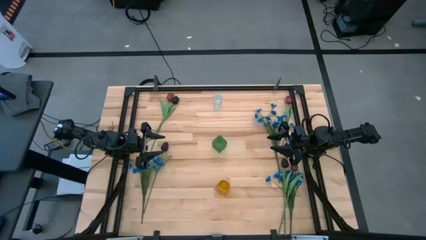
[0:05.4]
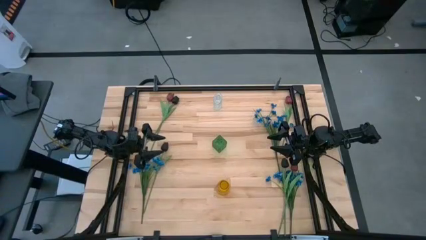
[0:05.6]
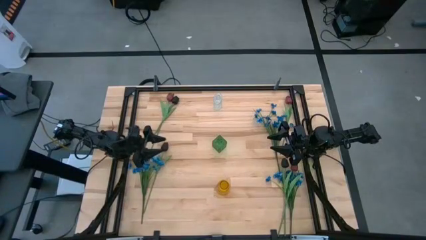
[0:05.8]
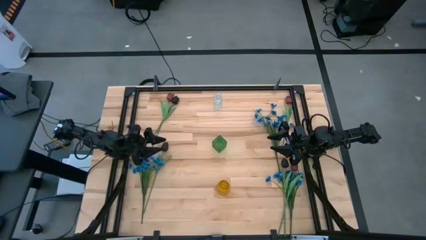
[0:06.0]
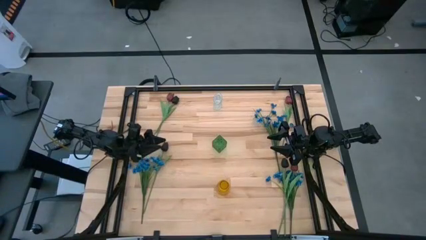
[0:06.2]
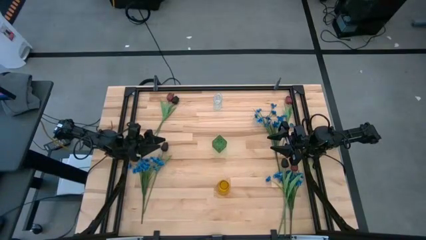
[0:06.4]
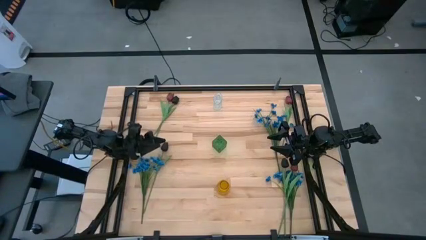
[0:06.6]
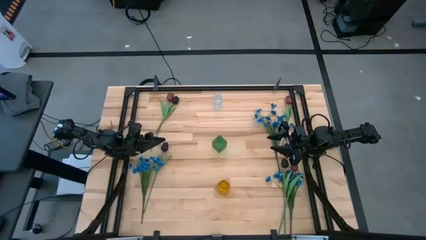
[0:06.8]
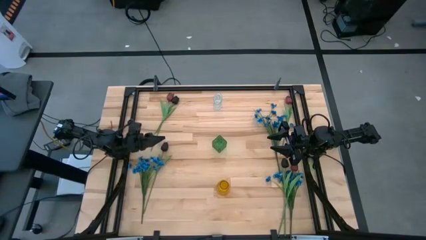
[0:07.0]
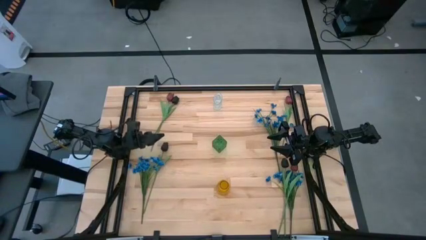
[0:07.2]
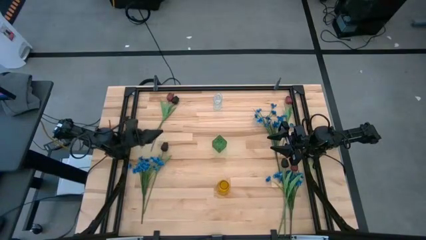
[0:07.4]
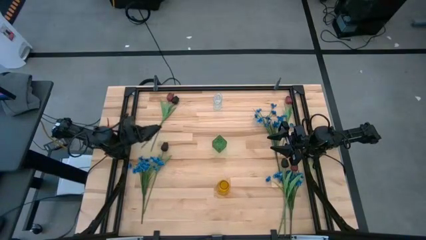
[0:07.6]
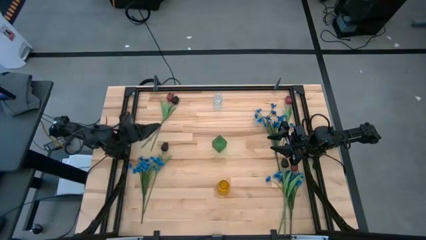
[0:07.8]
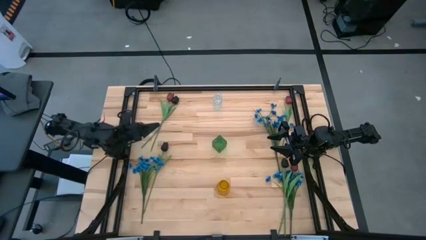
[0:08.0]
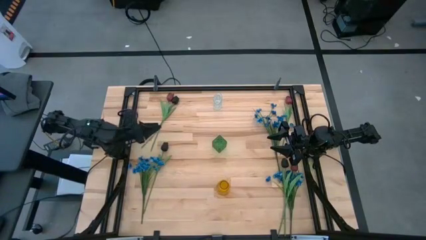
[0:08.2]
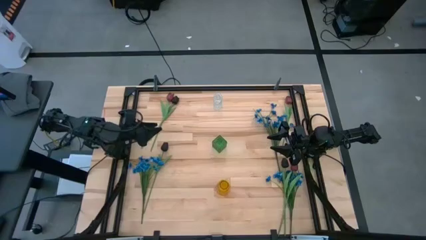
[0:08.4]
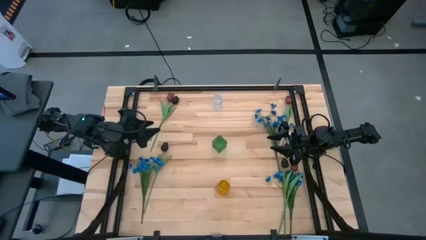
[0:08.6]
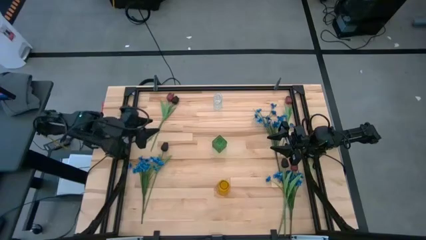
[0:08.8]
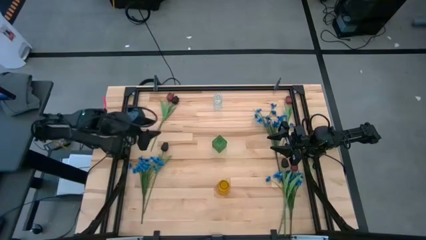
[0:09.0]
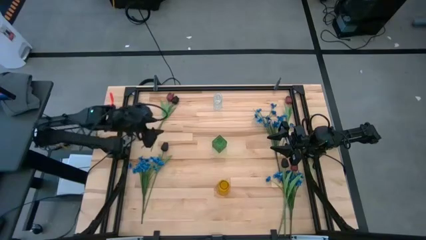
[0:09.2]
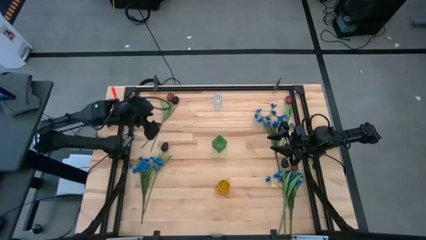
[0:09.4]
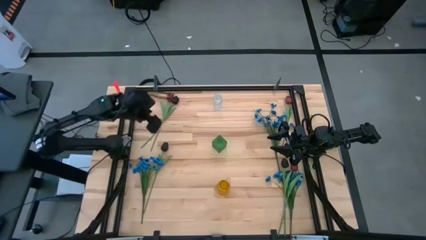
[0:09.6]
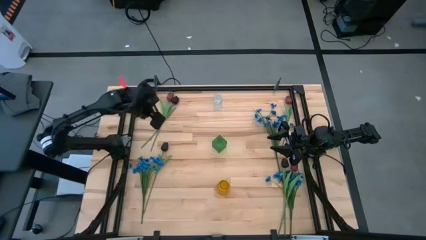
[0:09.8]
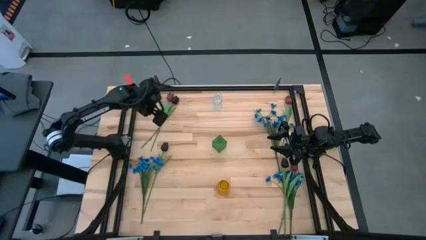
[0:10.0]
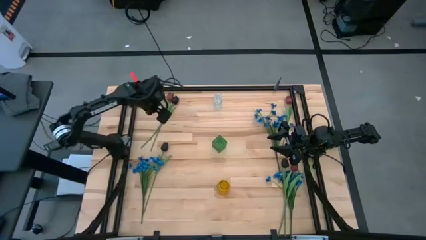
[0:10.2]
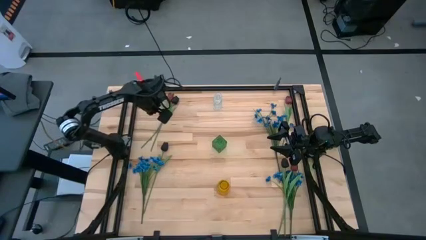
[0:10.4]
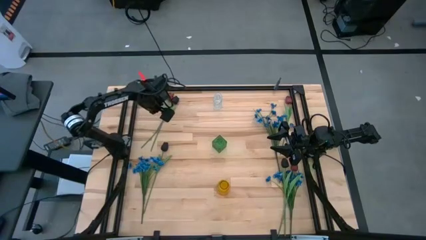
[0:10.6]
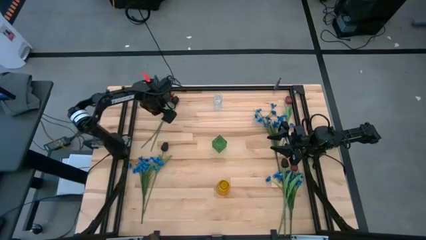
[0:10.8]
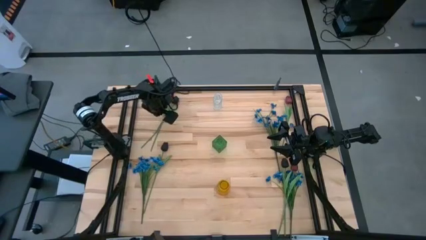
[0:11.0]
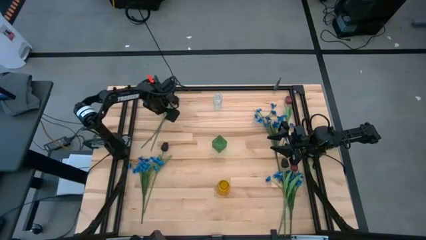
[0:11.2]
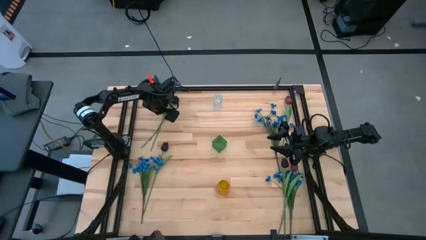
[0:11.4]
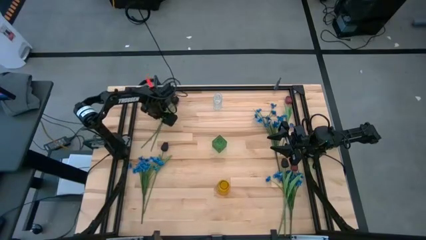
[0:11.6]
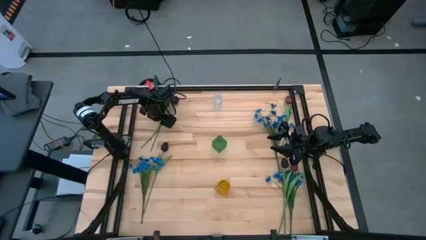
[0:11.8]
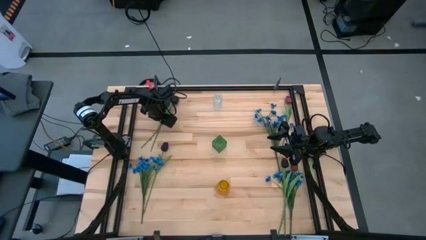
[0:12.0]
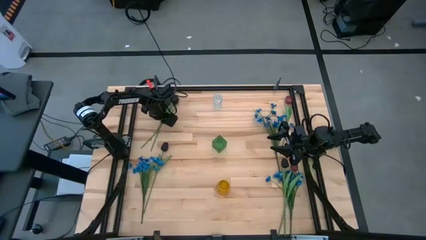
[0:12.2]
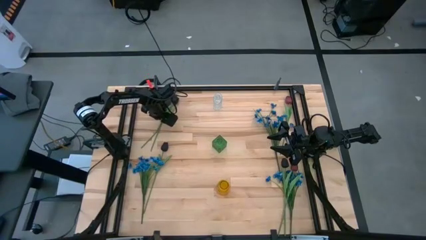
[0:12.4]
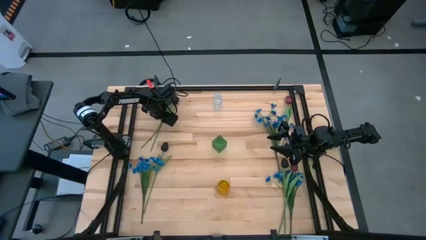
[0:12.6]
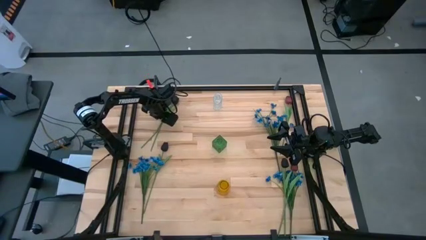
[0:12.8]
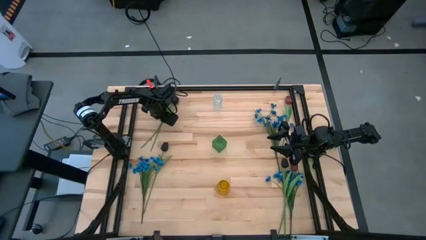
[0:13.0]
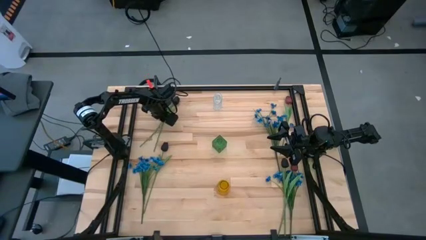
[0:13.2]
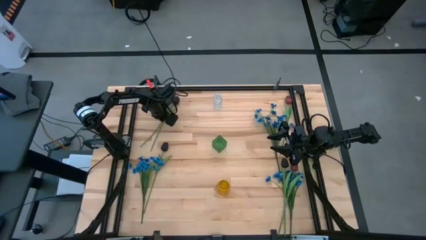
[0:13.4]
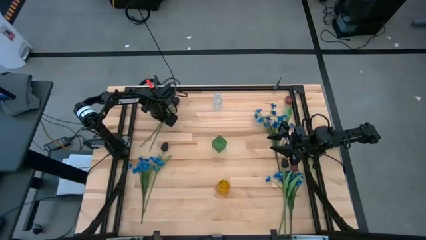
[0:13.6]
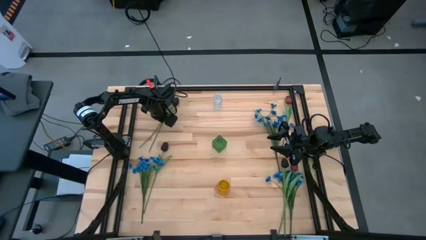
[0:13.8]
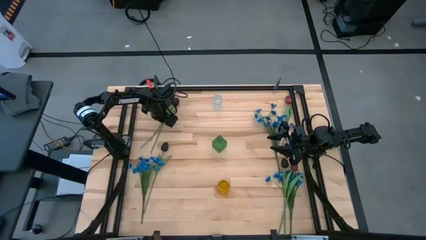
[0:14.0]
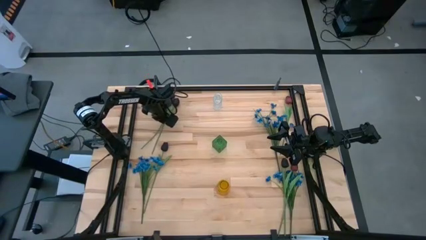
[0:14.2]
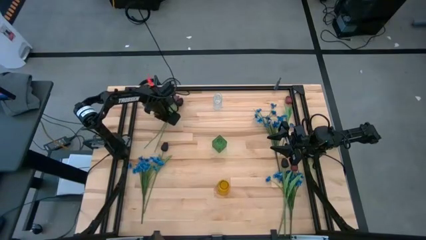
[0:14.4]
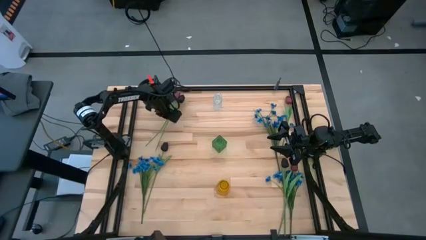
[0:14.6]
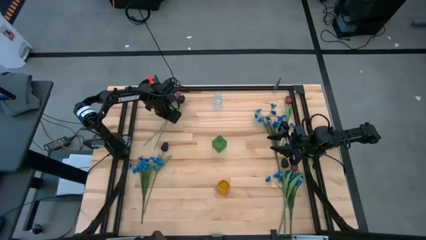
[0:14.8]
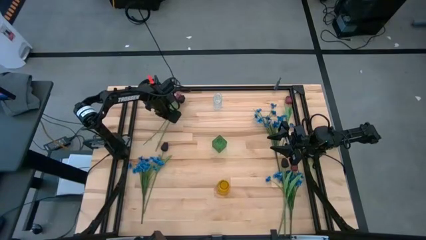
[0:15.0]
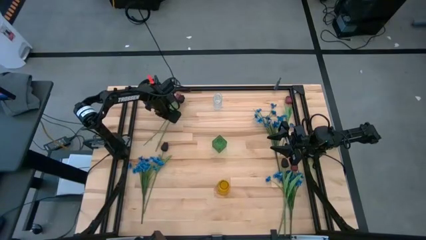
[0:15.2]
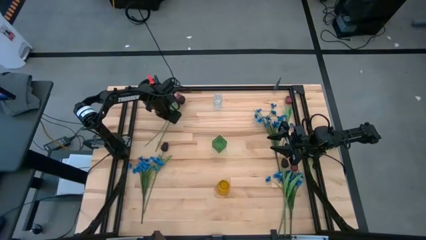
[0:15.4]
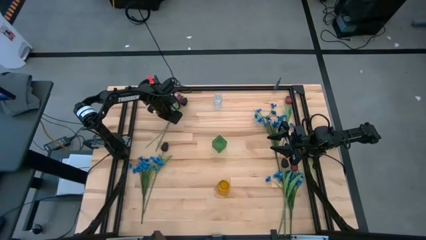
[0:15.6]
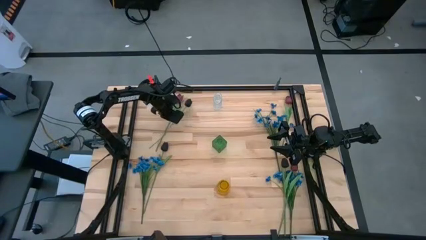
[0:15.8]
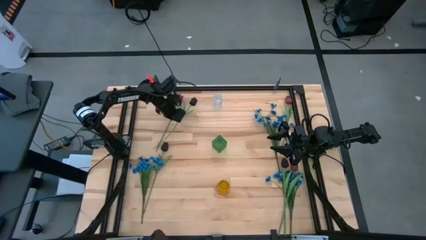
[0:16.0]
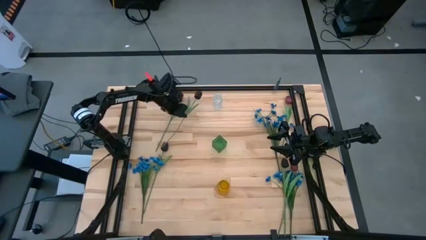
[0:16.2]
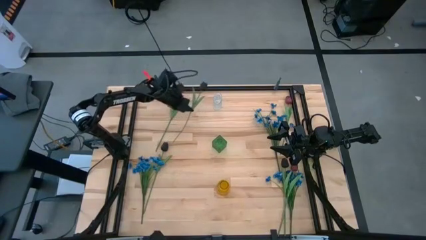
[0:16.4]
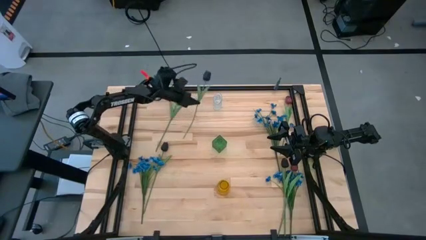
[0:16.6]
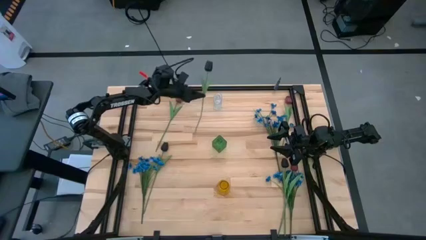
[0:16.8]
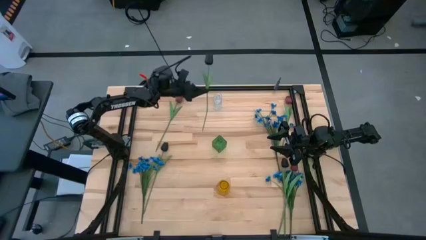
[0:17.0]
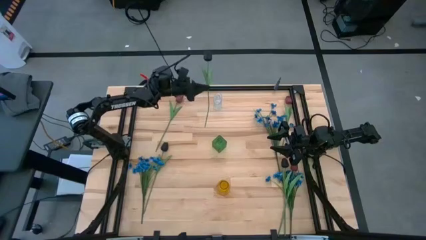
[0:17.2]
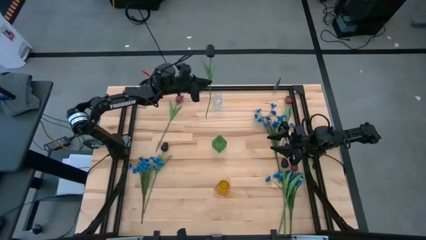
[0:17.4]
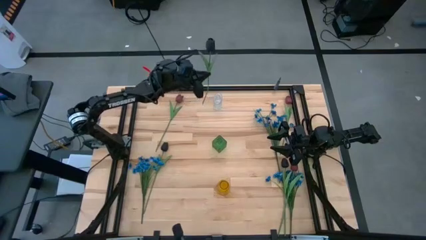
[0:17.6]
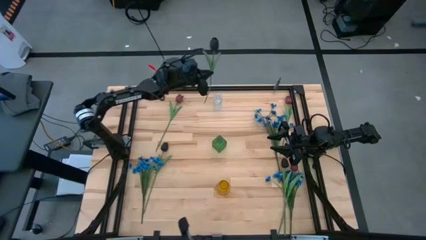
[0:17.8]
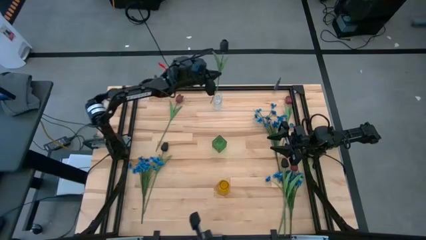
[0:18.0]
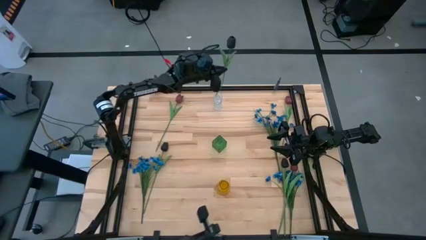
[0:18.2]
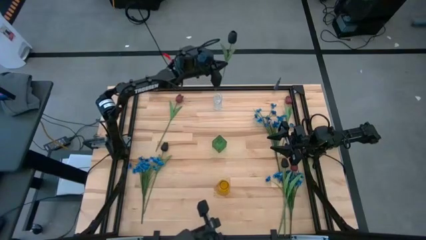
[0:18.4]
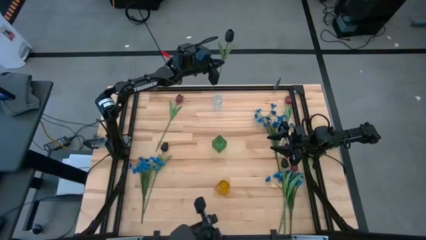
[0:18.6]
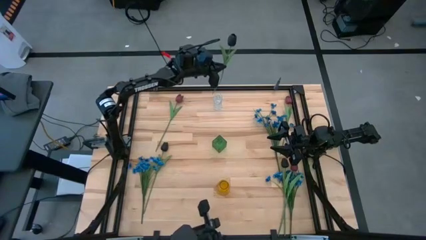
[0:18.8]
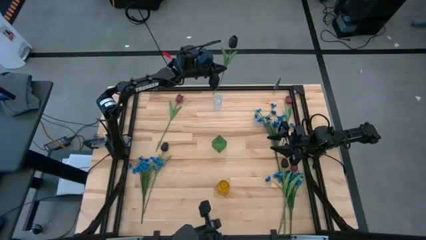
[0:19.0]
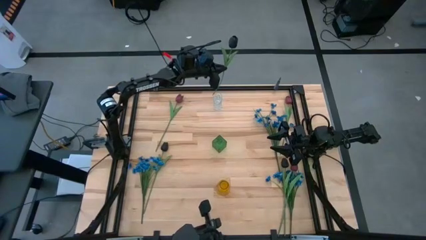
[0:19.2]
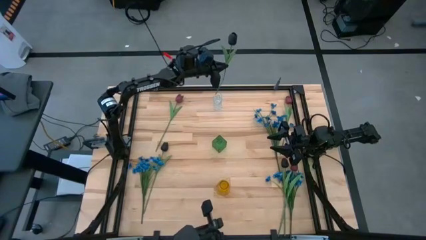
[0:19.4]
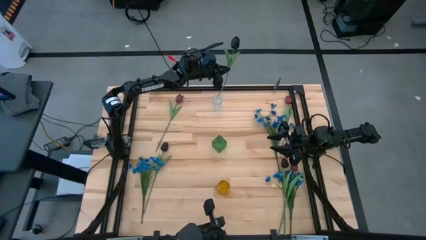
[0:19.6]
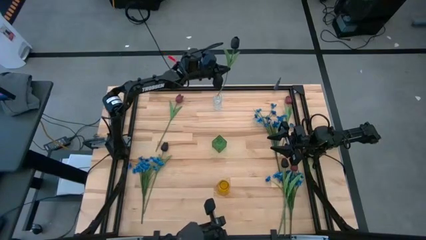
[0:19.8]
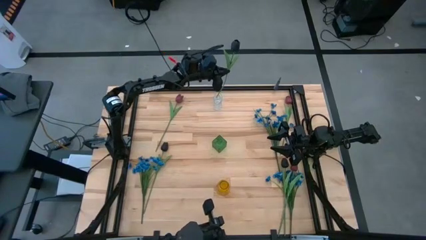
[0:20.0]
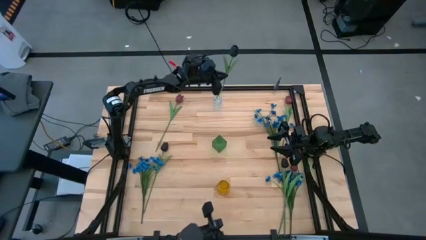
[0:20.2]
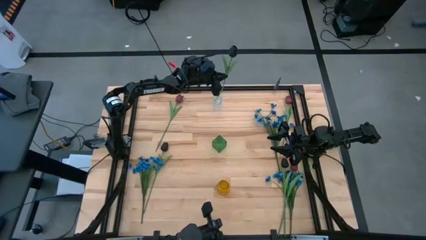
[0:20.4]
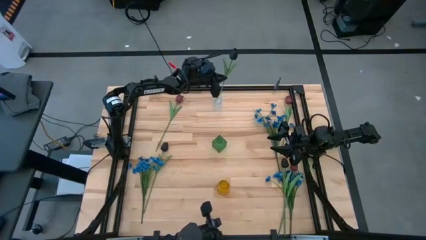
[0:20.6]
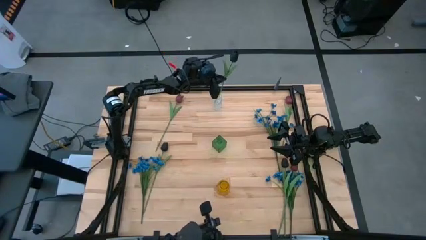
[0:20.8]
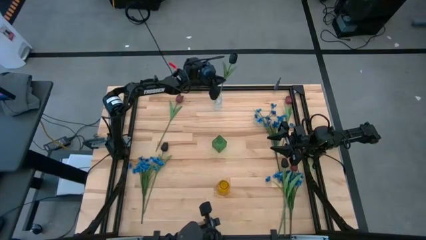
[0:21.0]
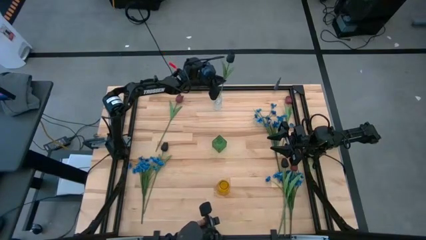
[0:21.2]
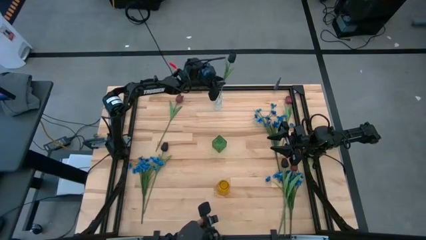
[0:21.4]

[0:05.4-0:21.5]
Task: Sort flowers into vase by color
Put the top left black tulip into the transparent vase
